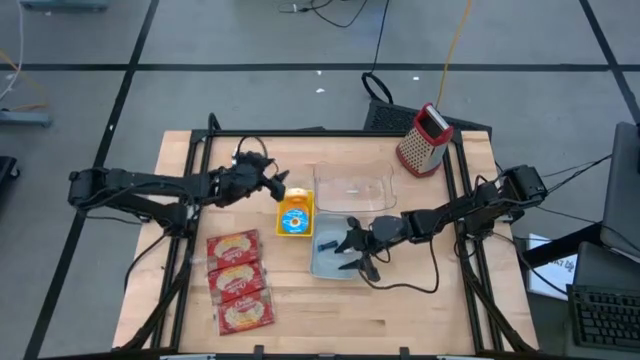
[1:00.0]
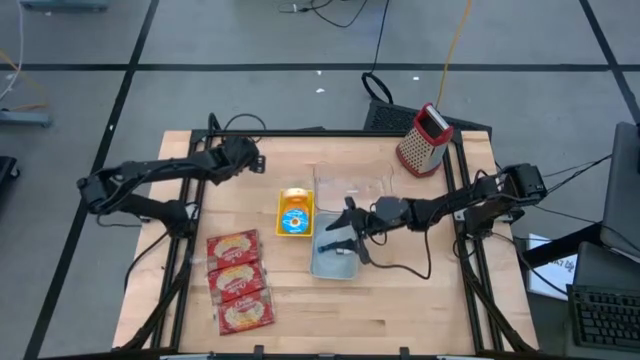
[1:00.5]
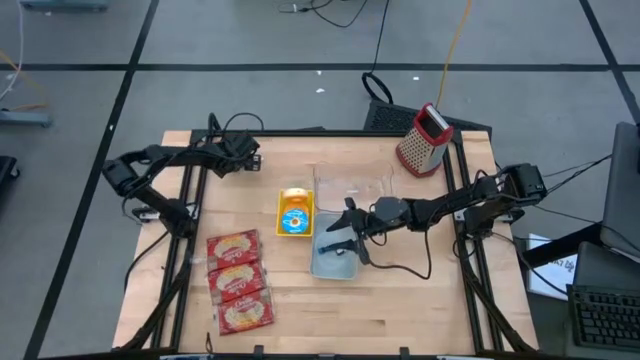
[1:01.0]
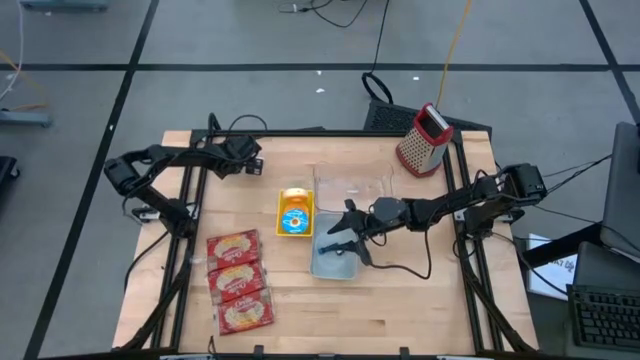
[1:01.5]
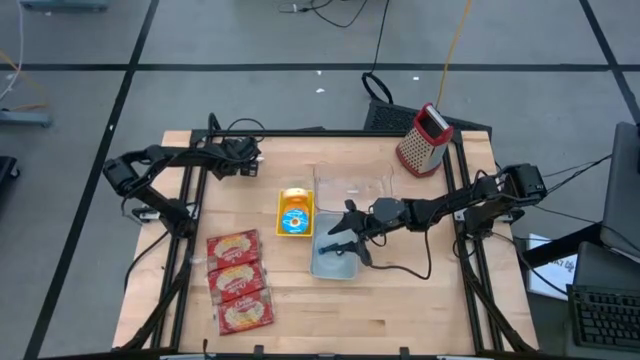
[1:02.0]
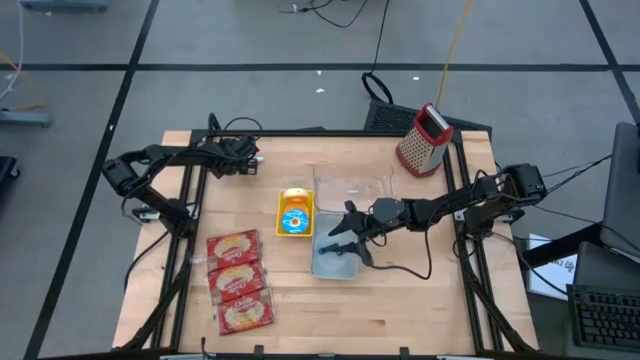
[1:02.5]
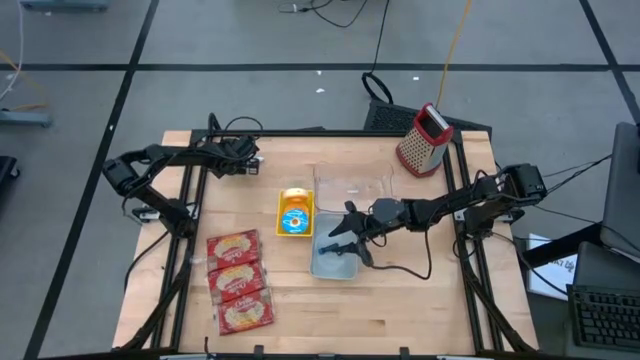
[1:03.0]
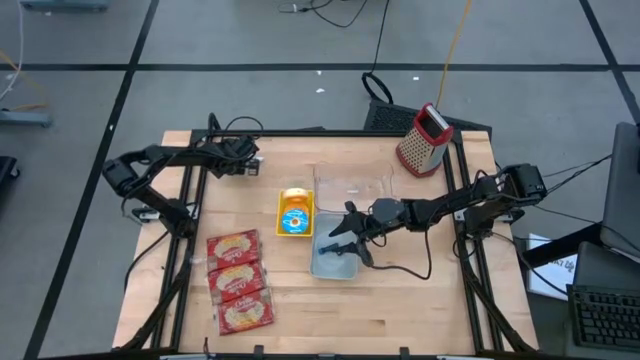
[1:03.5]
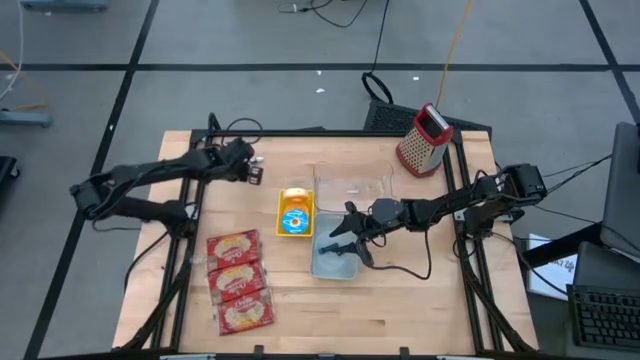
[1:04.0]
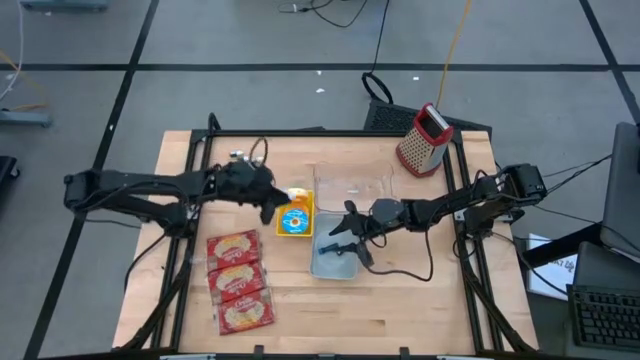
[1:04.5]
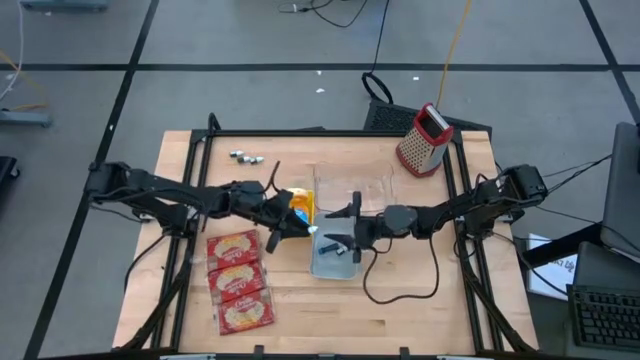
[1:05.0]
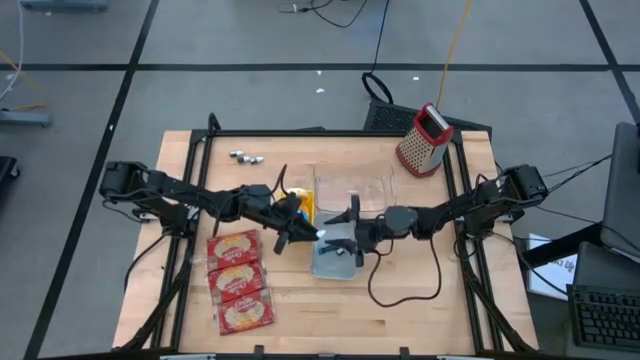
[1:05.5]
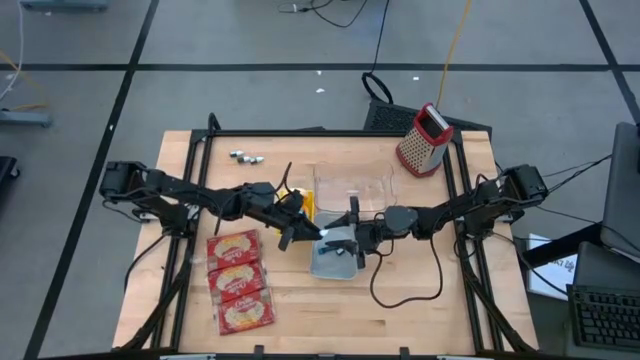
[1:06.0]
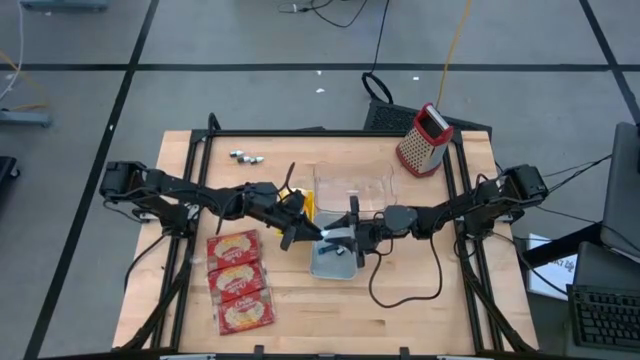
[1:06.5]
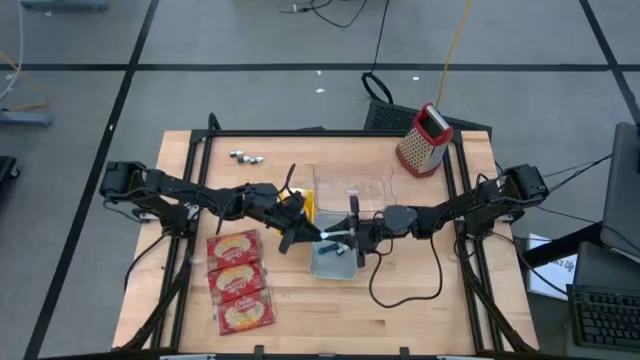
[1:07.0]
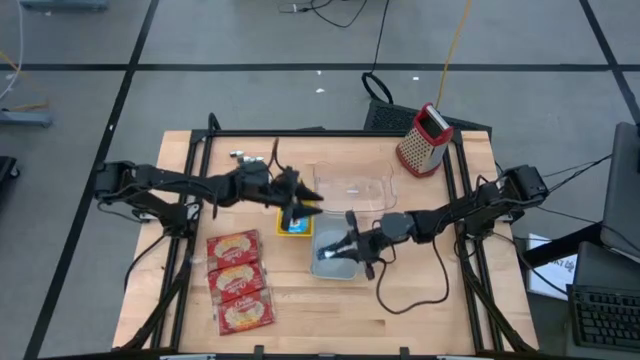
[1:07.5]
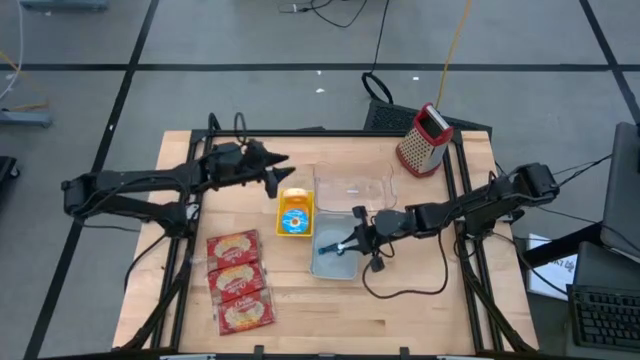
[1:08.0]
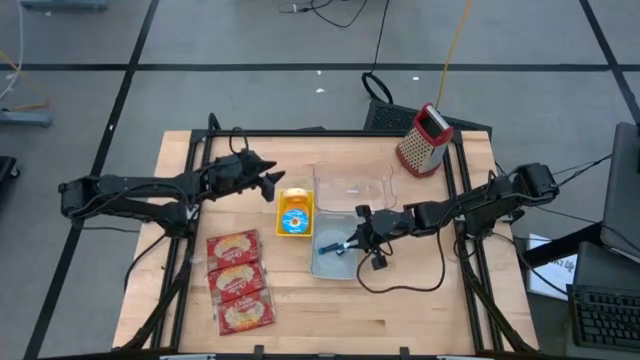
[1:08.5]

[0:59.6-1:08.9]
Put the purple food coloring bottle into the gray bin

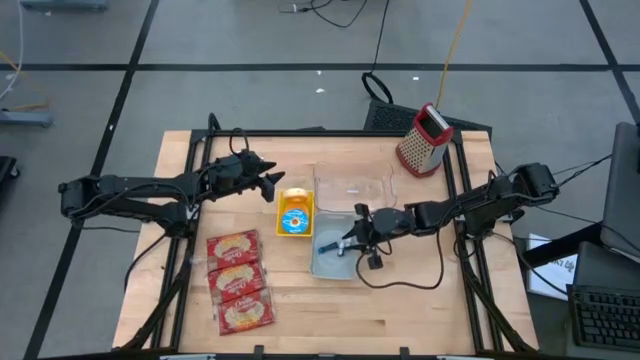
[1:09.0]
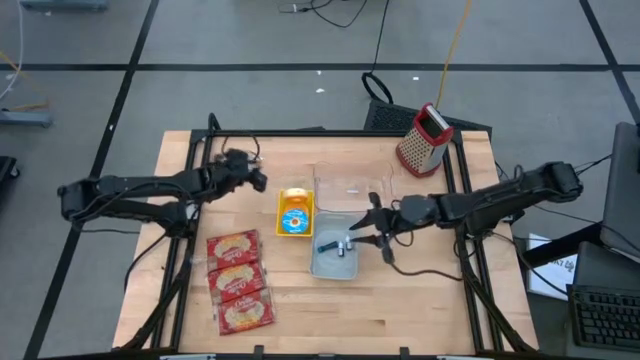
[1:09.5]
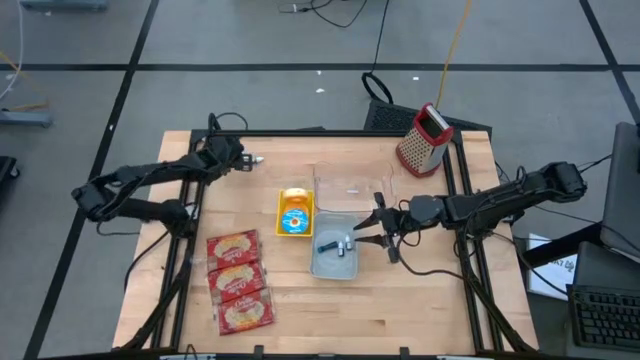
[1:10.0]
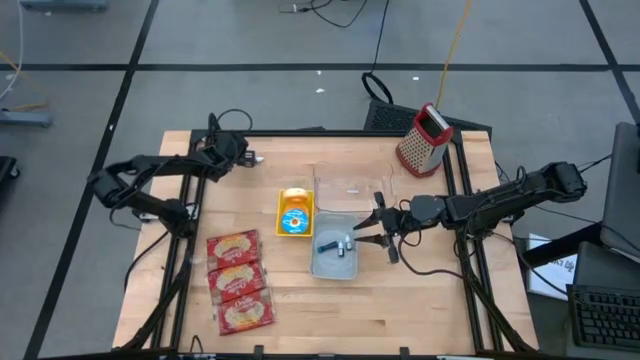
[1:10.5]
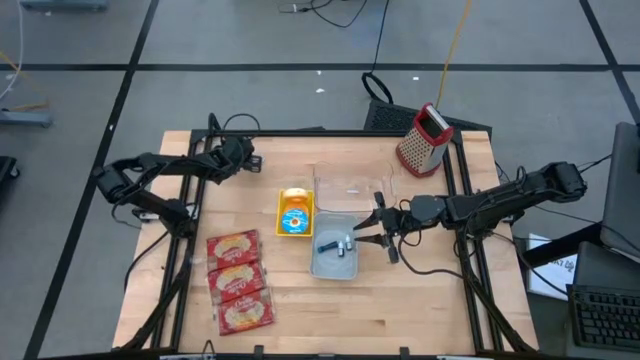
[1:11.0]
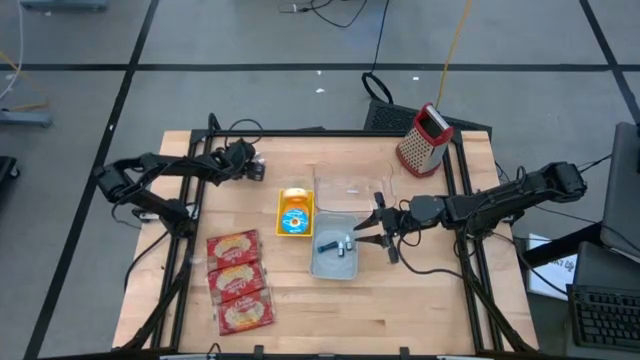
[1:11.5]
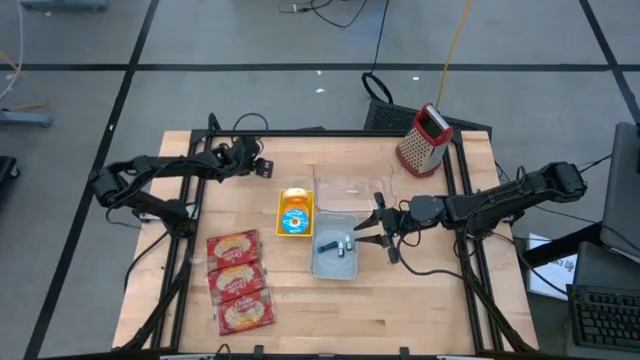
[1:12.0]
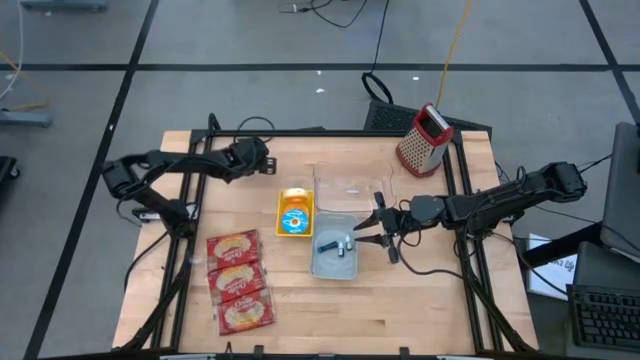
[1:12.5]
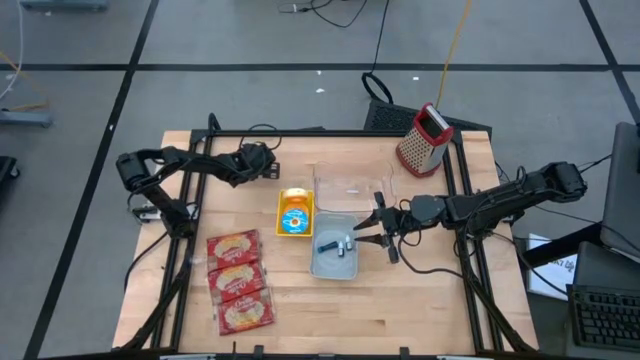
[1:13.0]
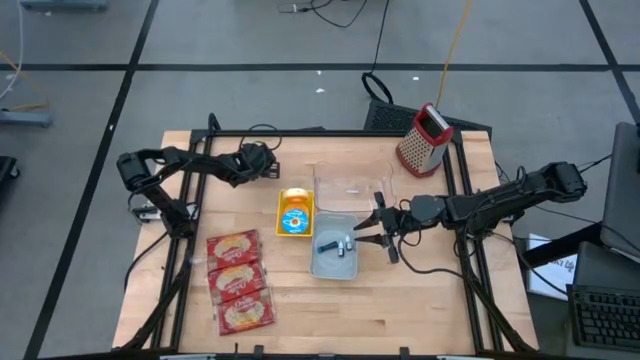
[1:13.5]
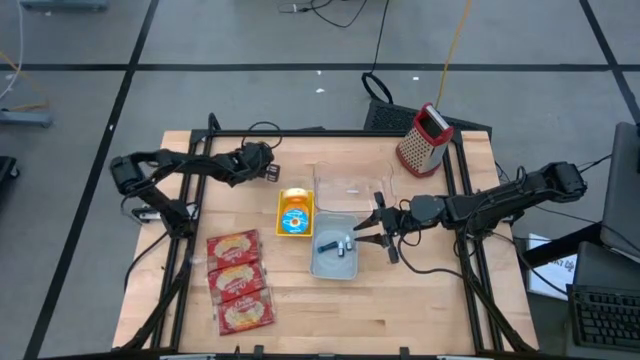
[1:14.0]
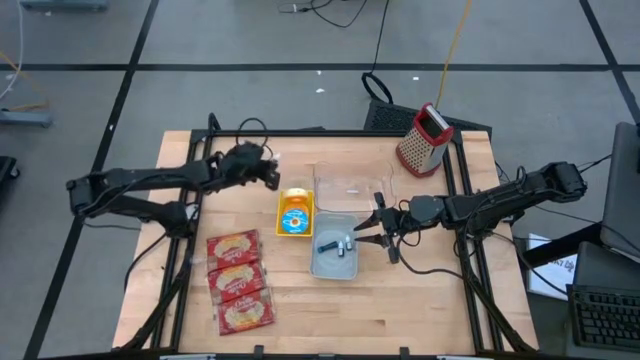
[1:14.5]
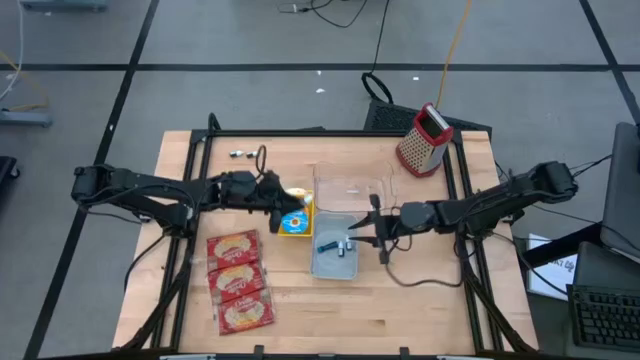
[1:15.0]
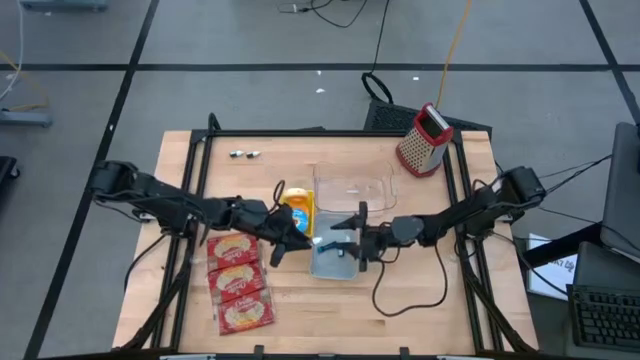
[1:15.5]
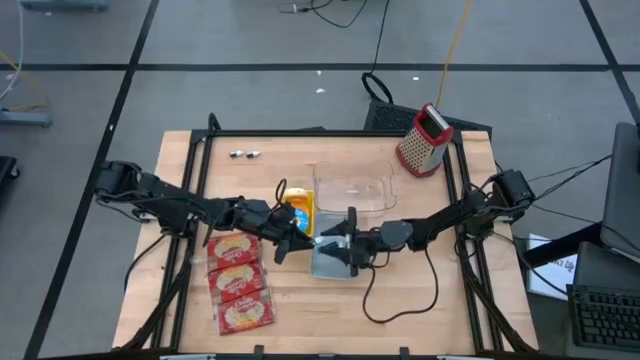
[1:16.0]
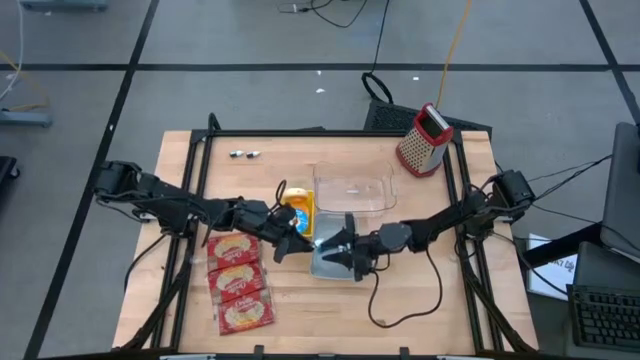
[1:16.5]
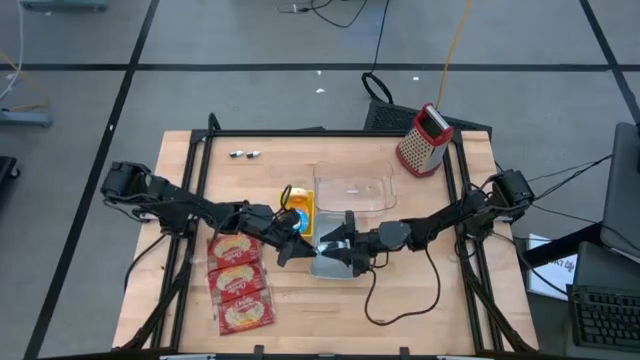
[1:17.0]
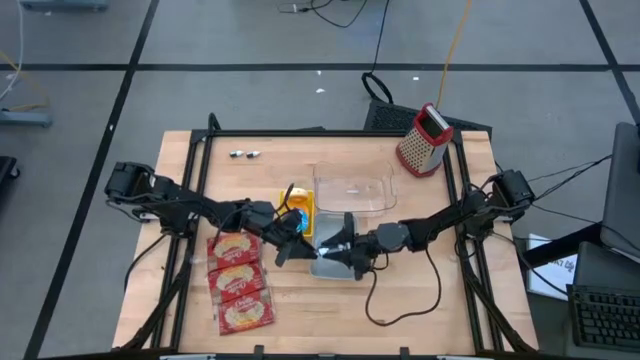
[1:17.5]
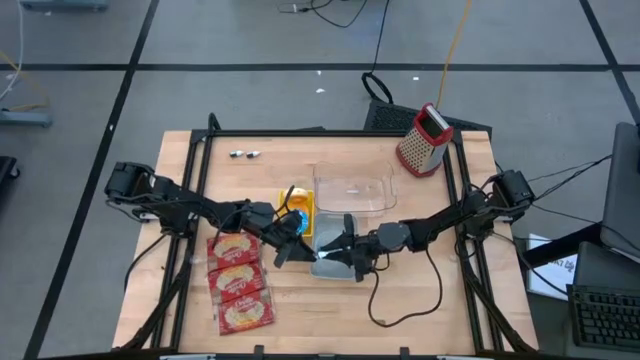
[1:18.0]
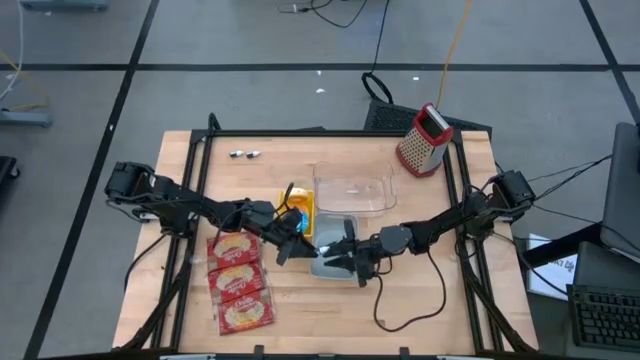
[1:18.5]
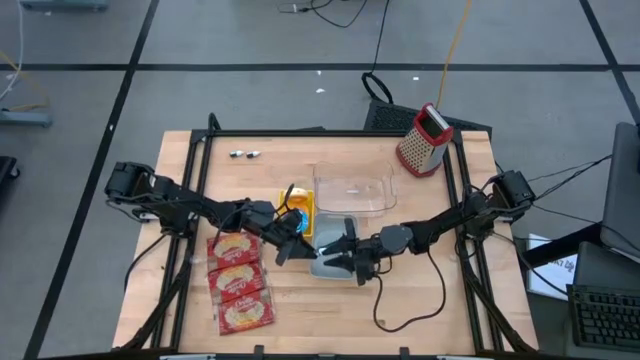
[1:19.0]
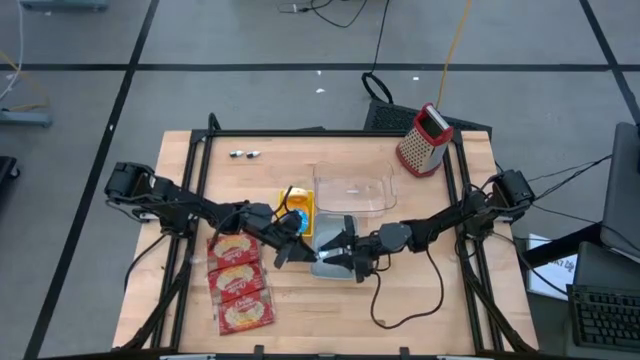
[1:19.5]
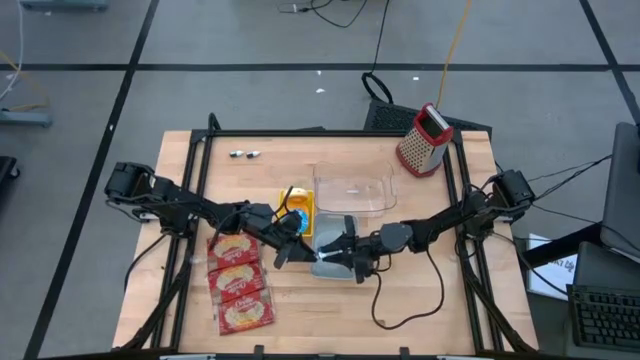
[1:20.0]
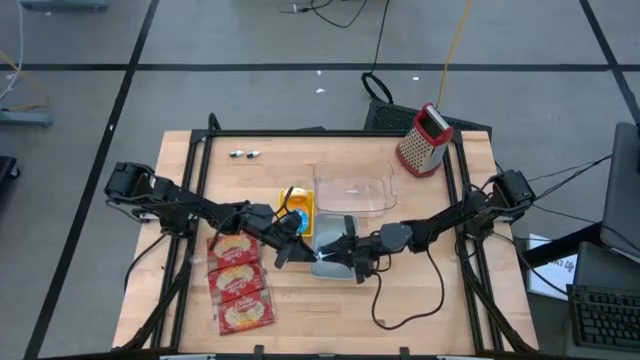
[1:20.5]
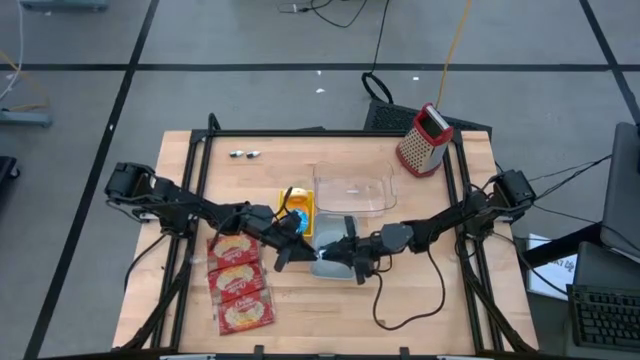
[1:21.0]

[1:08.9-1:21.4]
Put the brown food coloring bottle into the gray bin
